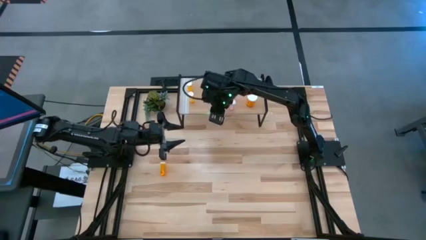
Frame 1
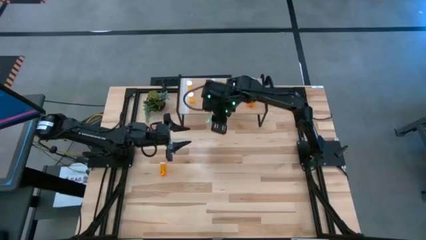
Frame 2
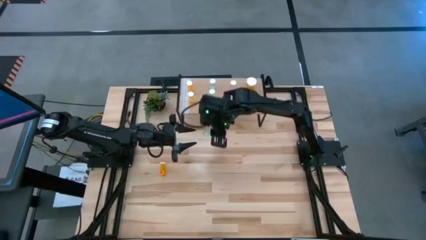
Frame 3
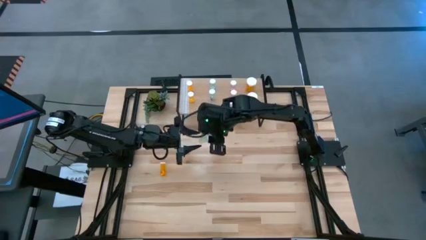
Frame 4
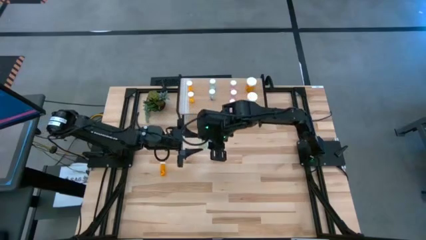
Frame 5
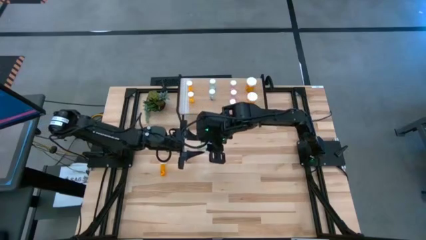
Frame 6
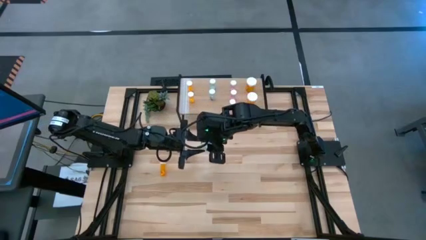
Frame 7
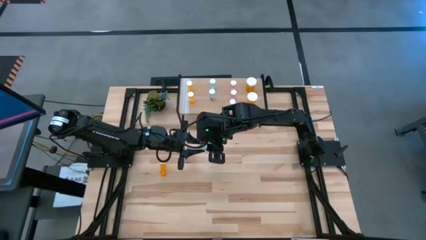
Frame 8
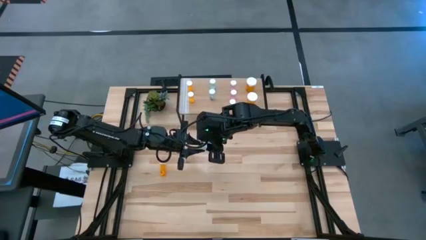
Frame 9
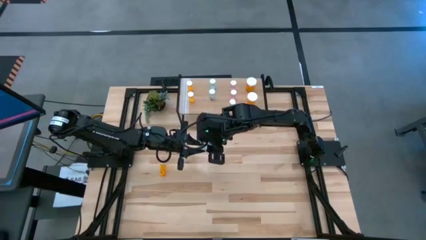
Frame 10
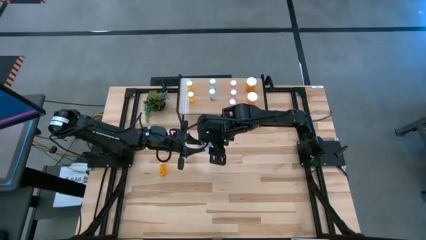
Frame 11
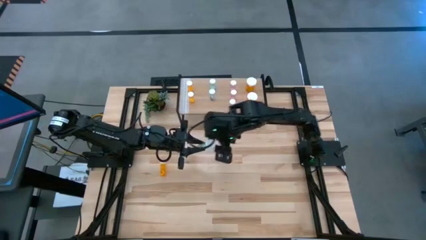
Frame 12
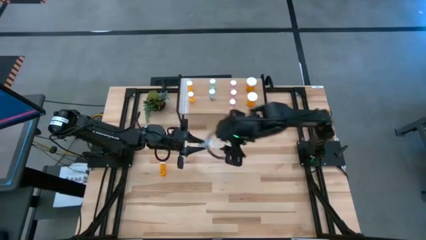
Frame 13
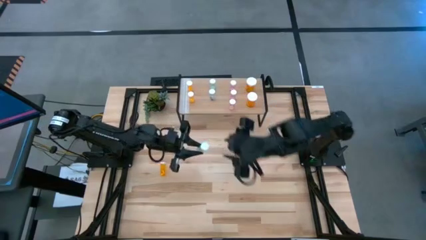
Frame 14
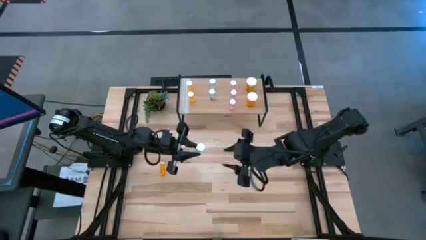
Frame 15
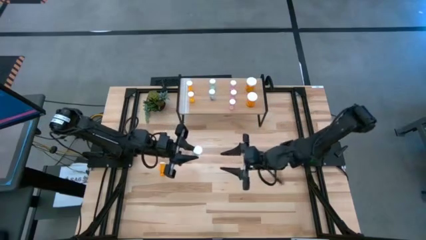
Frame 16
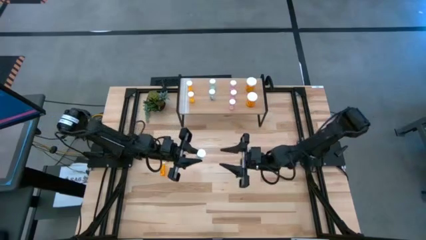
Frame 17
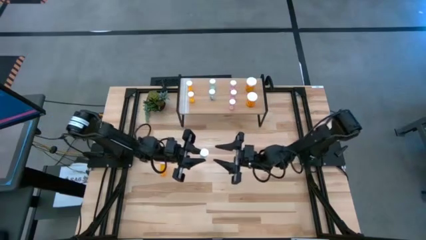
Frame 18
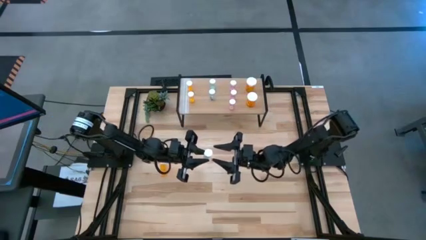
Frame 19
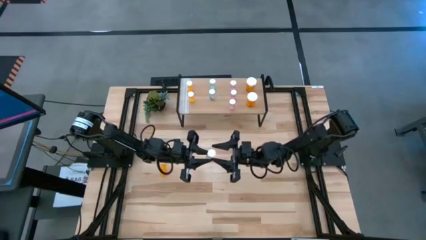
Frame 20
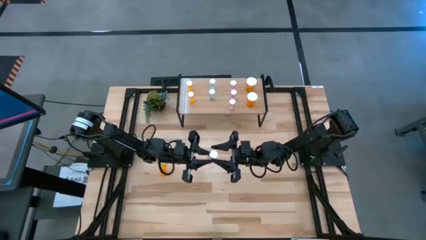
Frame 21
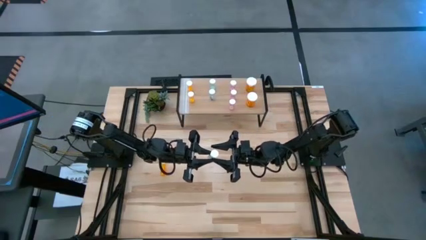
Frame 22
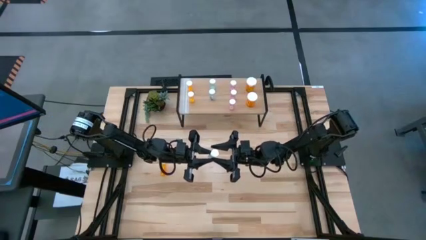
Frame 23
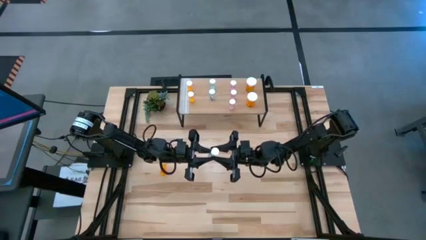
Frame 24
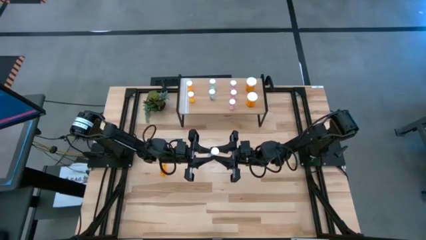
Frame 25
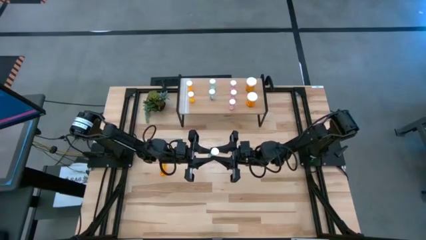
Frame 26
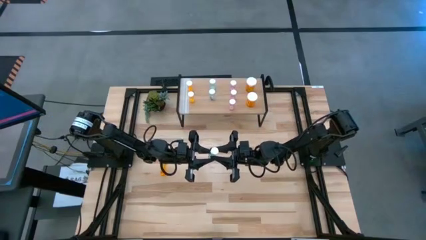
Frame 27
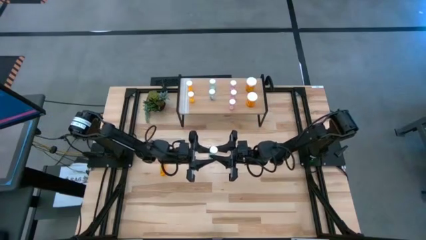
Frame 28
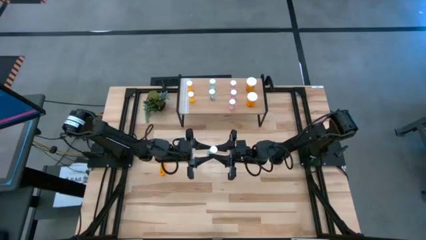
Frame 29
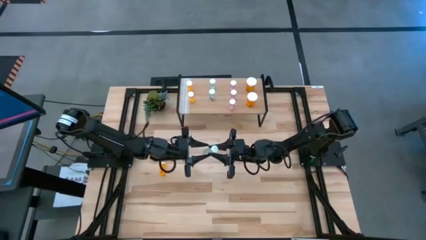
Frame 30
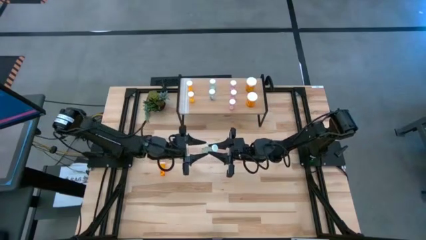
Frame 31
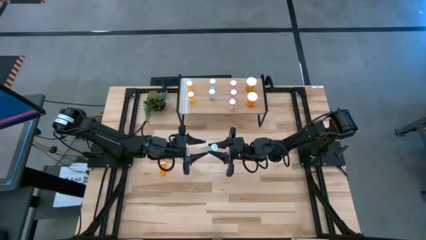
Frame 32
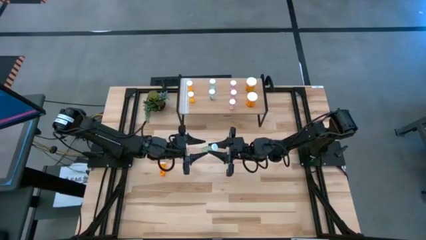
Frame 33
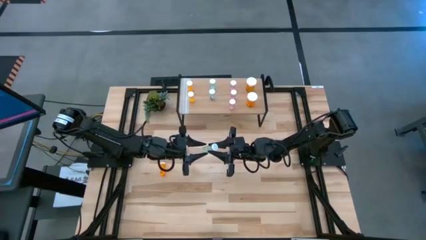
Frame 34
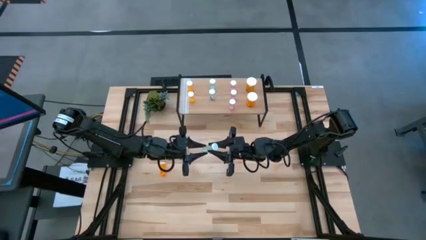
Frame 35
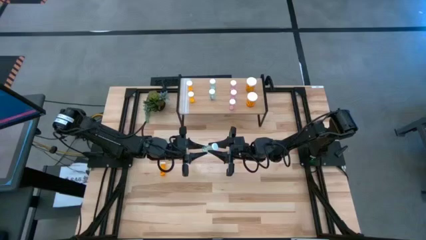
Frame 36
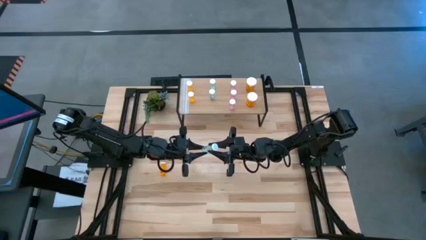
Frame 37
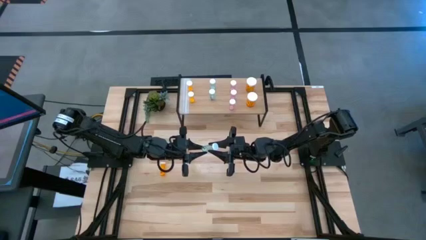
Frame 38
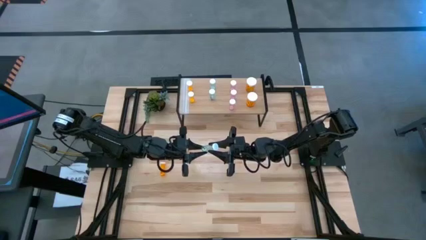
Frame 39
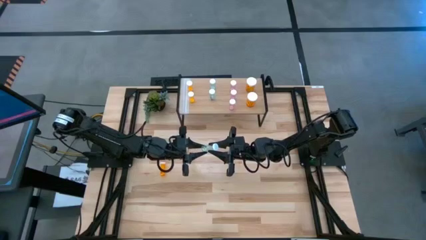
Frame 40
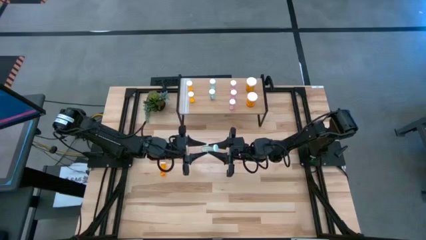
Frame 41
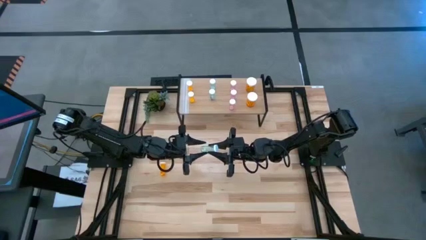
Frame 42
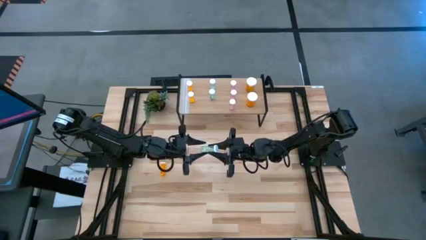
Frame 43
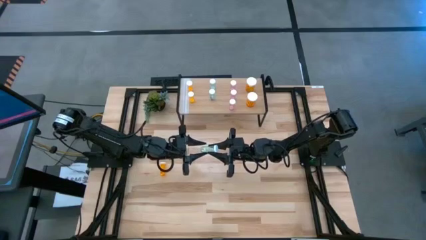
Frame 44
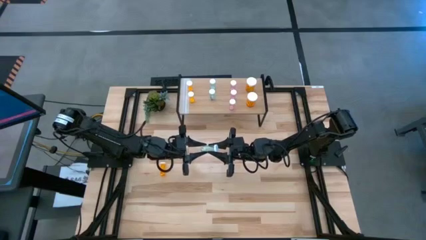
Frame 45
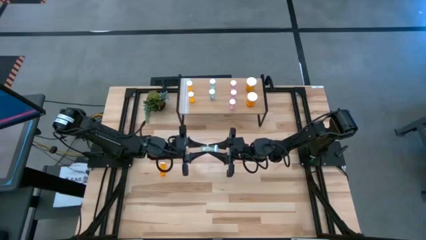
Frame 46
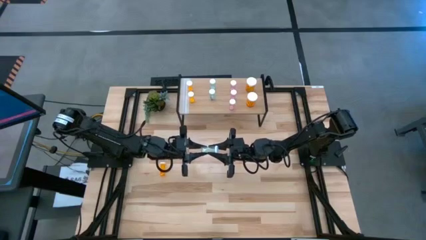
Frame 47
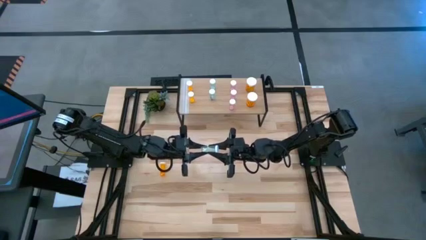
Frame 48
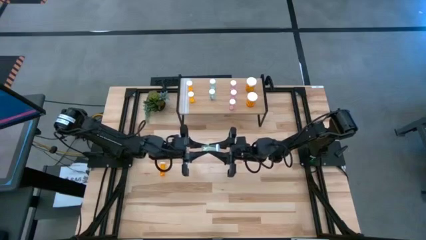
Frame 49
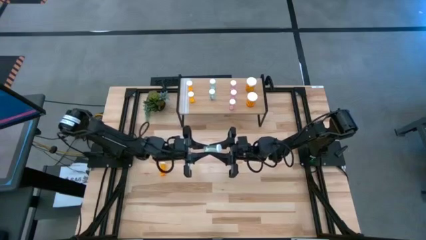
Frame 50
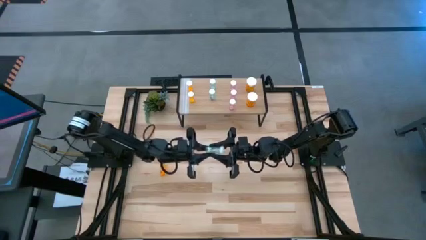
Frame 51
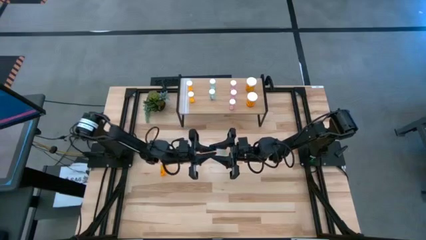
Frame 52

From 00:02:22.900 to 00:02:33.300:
Task: Pick and place medicine bottles onto shelf by color
Put the green pill bottle on the shelf aligned with the other green pill bottles

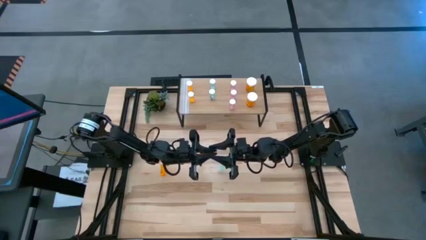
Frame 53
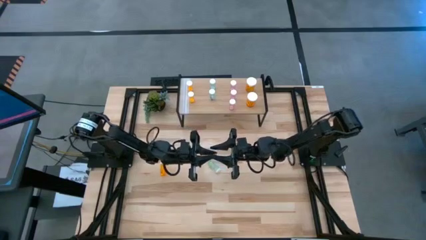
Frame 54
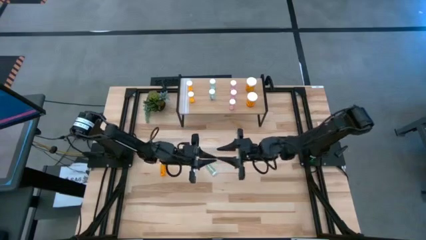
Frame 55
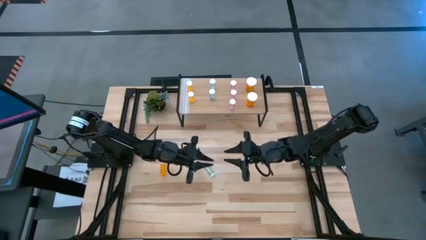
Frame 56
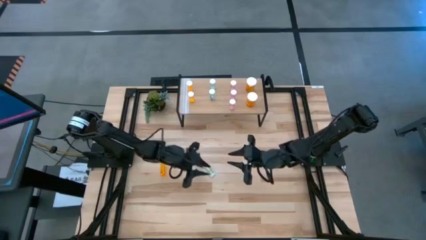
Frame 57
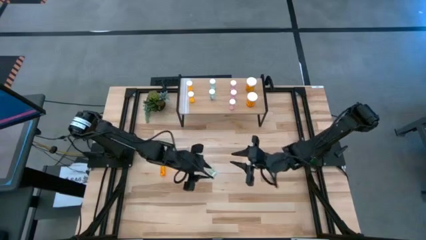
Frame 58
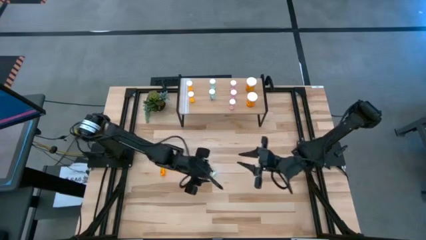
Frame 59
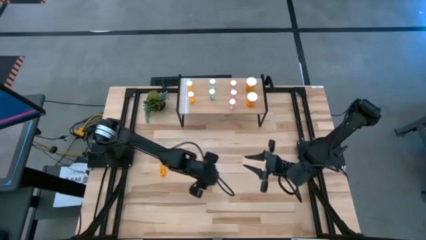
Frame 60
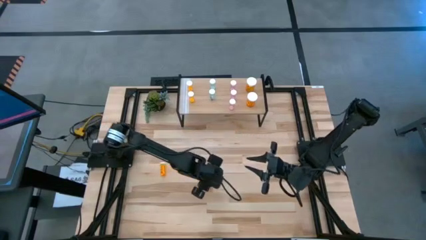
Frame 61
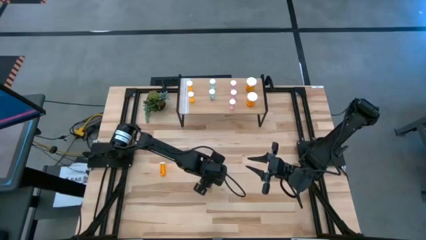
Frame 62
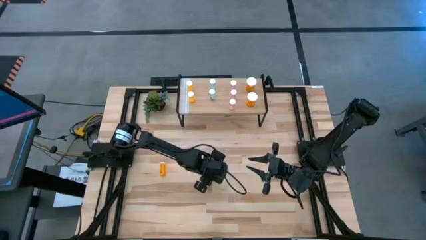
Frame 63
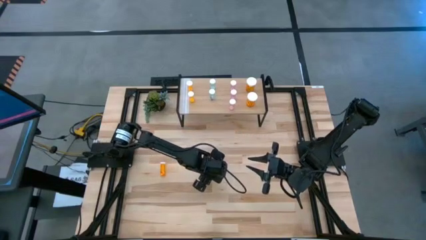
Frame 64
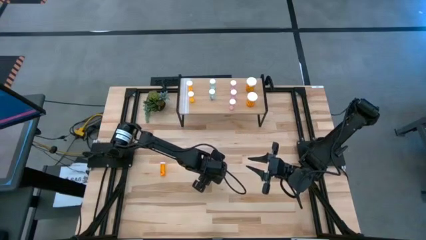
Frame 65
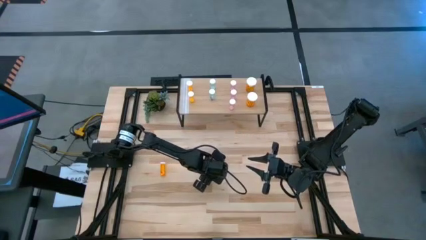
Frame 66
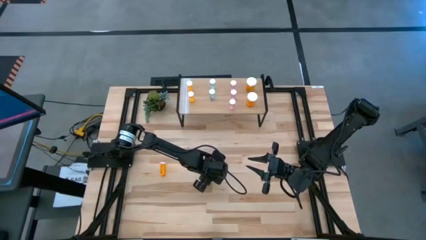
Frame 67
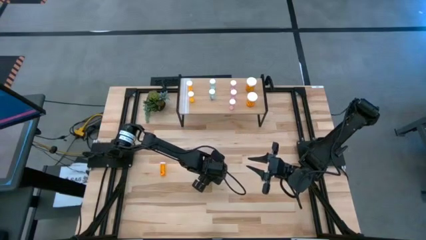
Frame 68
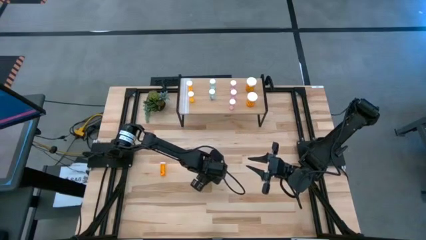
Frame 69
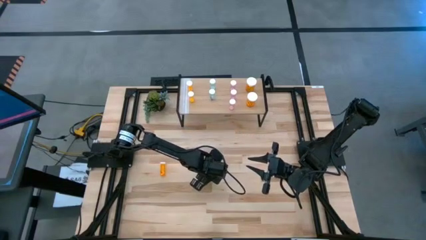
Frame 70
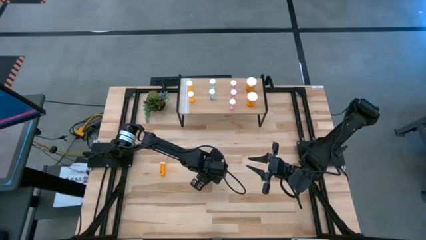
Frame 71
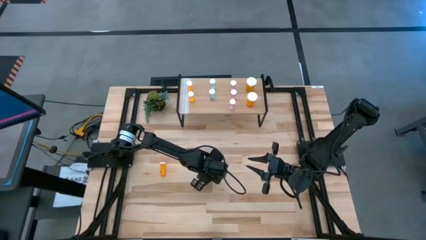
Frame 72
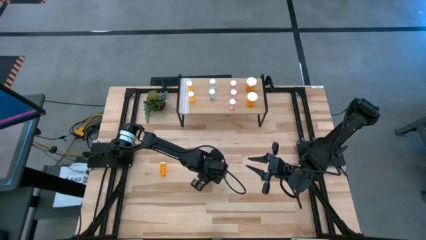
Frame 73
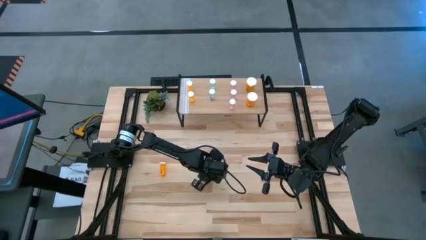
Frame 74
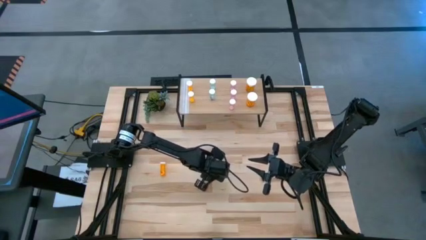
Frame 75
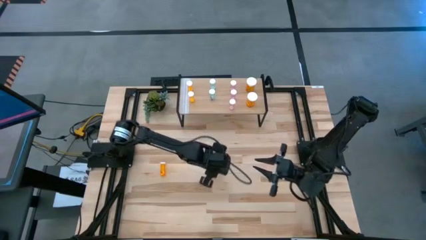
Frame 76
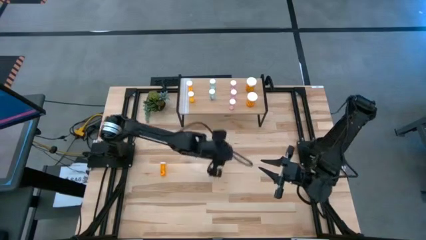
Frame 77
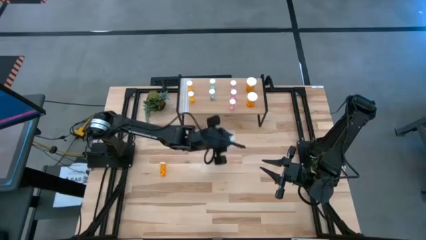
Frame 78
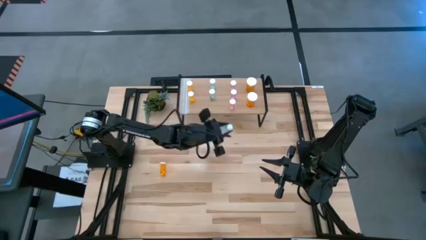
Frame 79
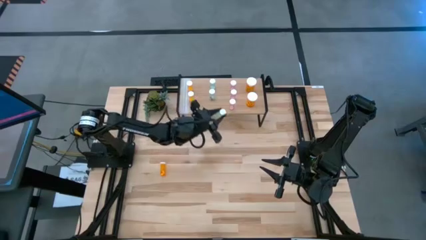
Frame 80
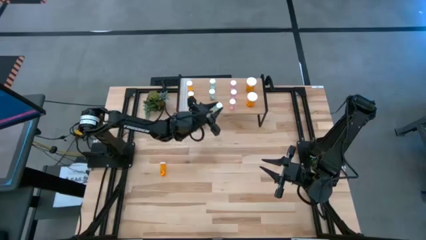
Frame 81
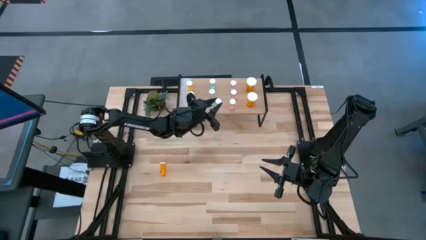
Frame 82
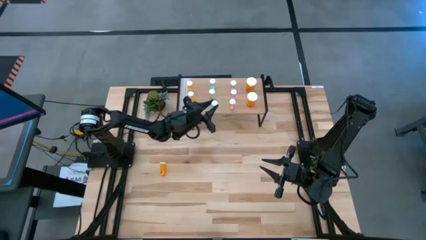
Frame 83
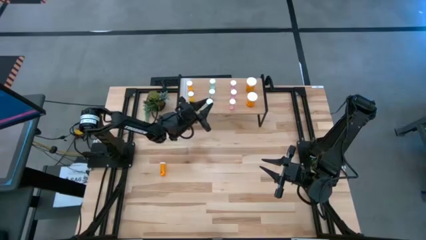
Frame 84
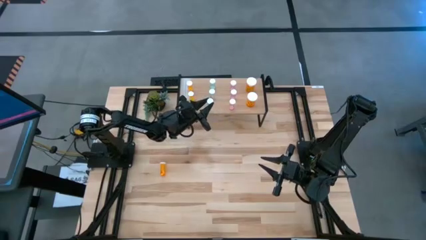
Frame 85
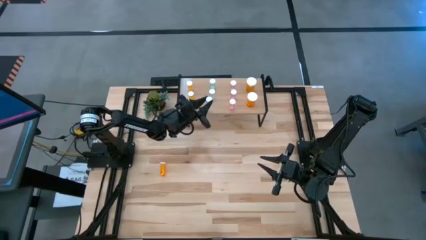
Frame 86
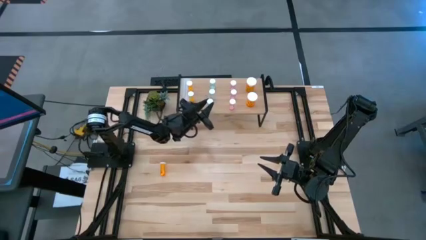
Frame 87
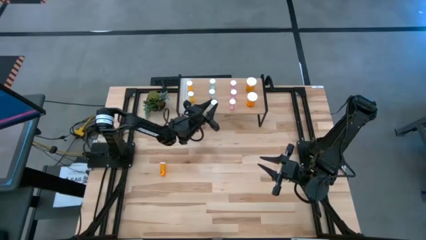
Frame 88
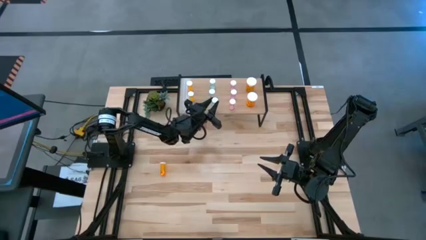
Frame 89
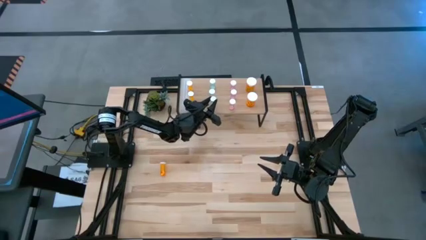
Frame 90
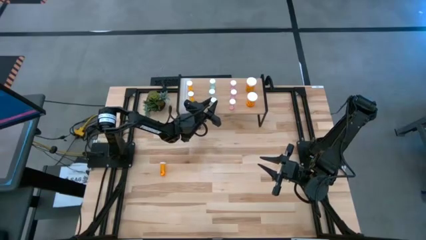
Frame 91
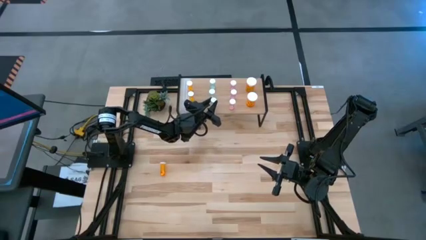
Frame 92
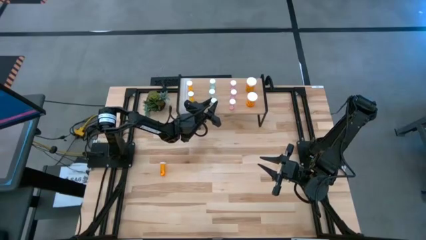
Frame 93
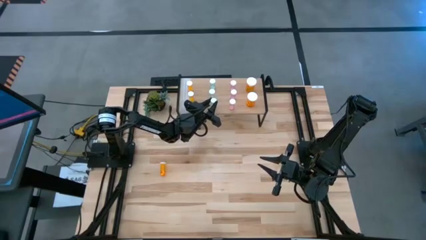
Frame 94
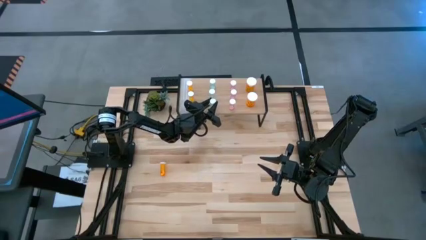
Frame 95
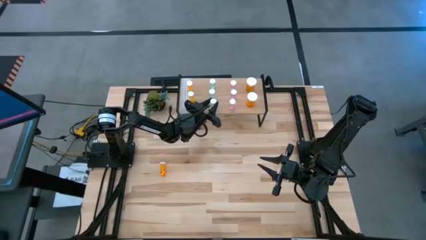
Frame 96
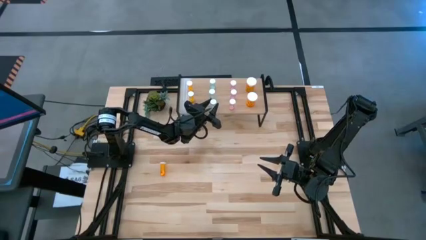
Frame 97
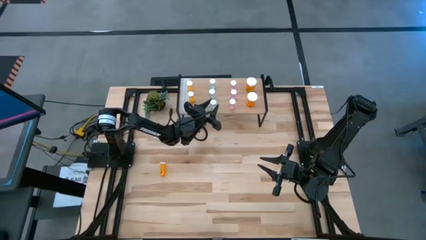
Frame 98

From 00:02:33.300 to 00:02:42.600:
Put the green pill bottle on the shelf aligned with the other green pill bottles
